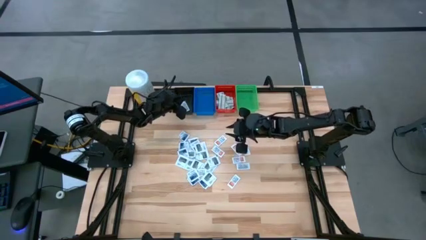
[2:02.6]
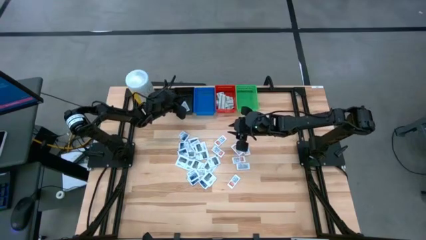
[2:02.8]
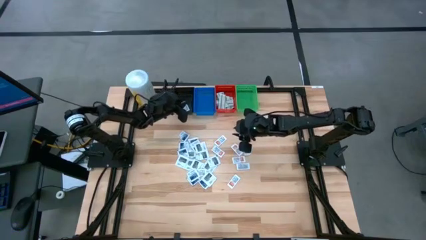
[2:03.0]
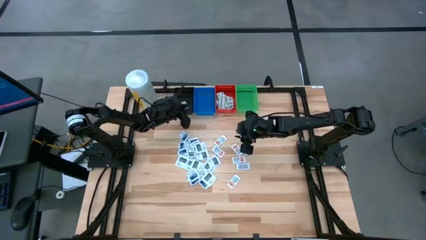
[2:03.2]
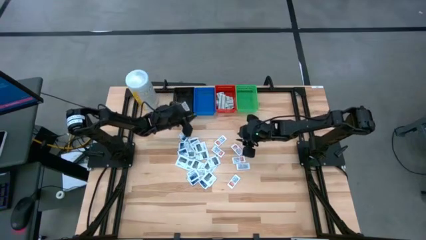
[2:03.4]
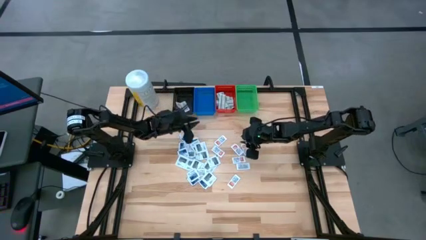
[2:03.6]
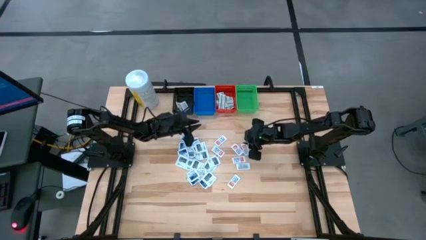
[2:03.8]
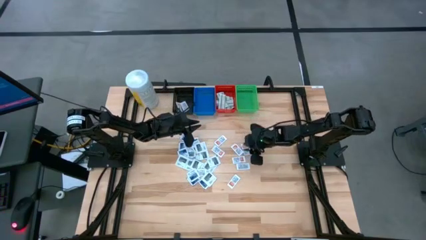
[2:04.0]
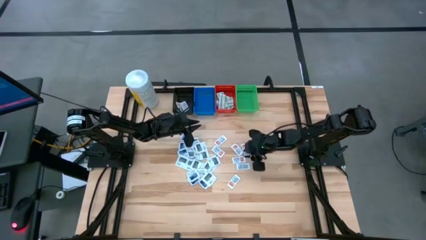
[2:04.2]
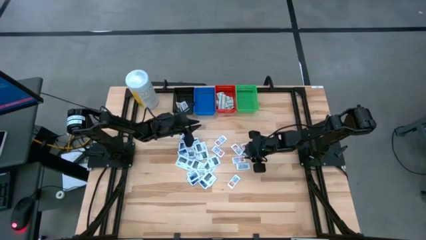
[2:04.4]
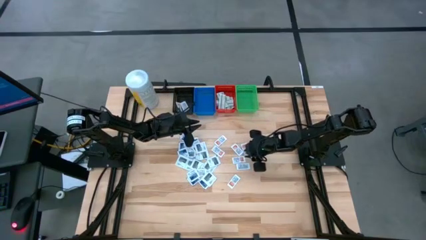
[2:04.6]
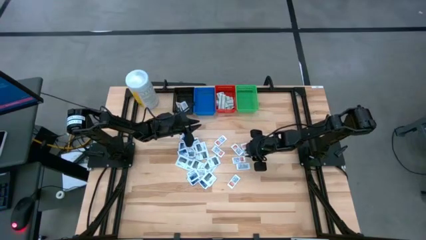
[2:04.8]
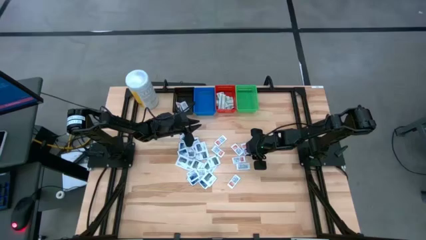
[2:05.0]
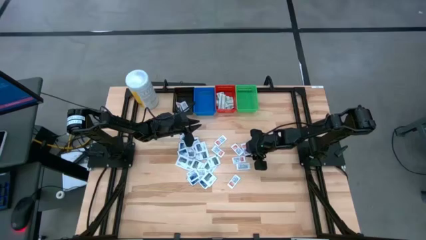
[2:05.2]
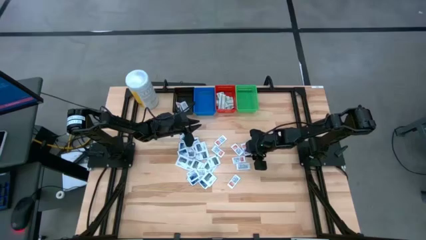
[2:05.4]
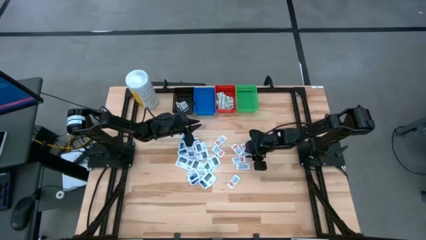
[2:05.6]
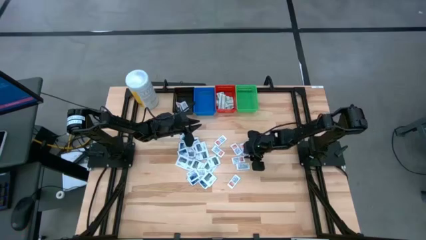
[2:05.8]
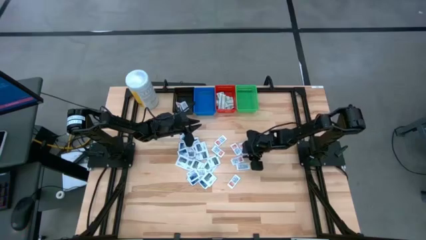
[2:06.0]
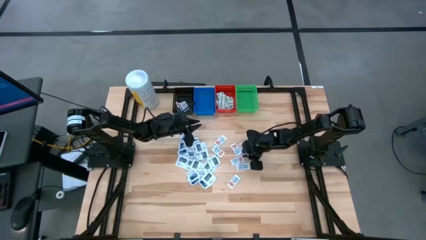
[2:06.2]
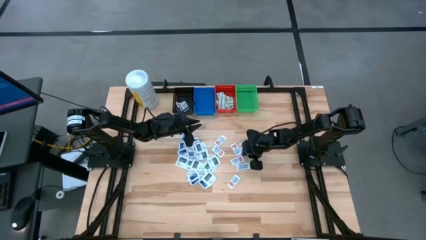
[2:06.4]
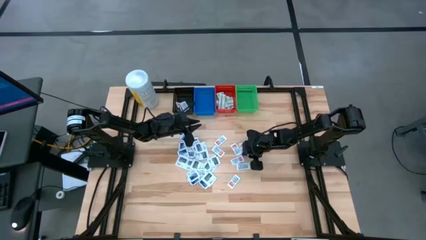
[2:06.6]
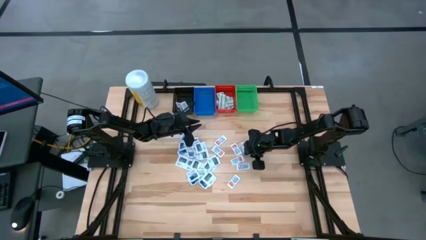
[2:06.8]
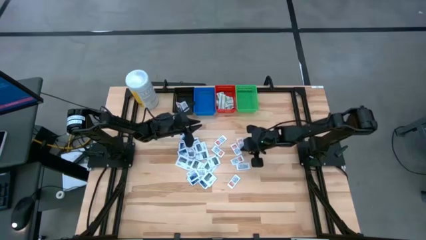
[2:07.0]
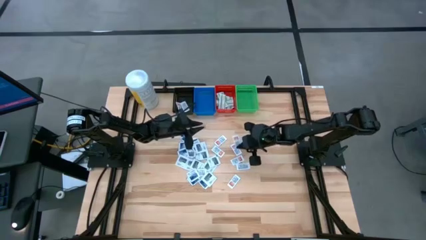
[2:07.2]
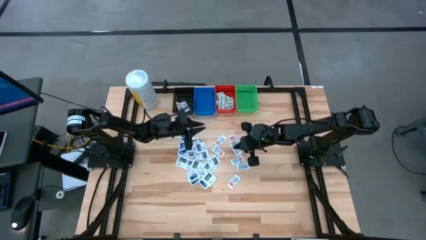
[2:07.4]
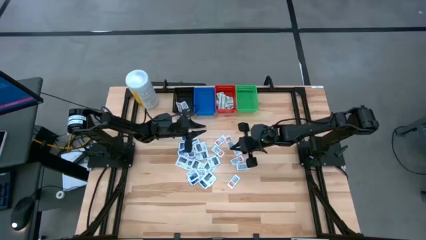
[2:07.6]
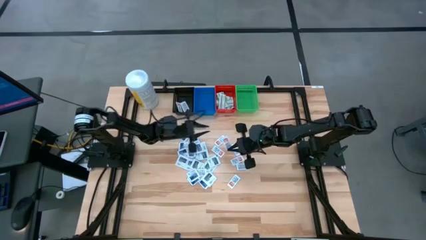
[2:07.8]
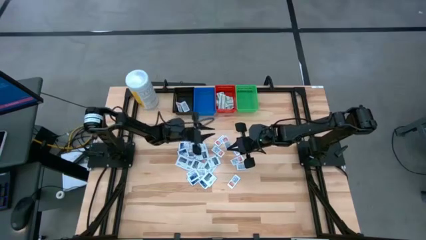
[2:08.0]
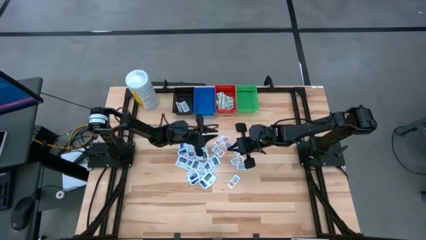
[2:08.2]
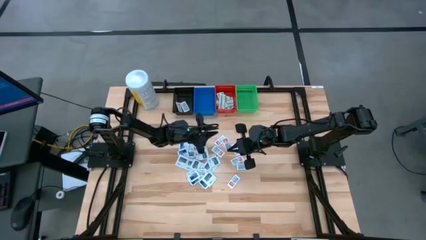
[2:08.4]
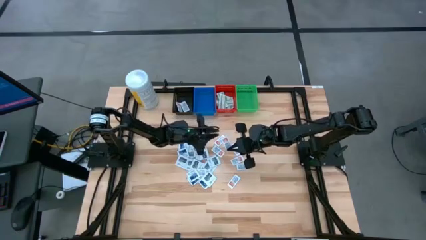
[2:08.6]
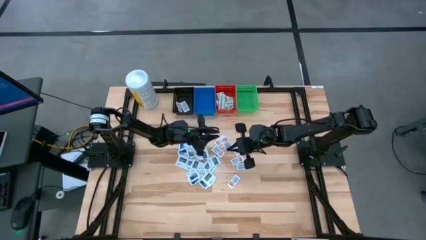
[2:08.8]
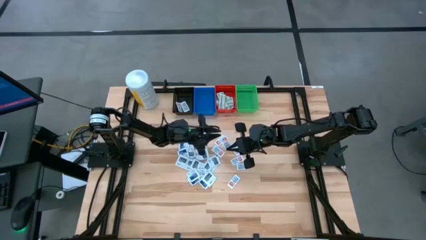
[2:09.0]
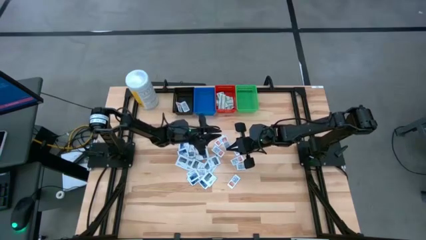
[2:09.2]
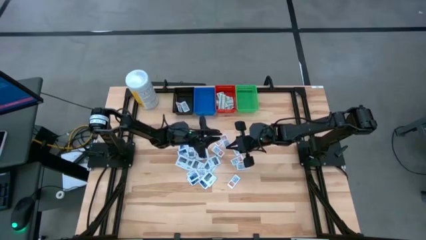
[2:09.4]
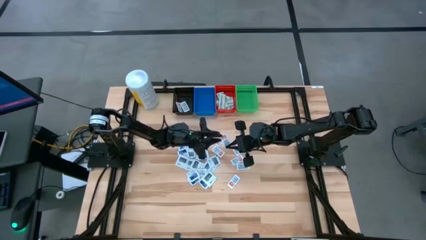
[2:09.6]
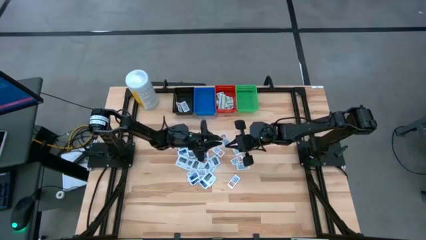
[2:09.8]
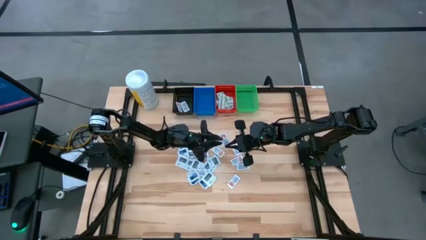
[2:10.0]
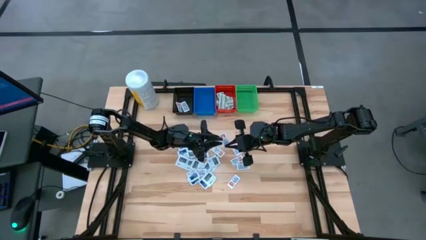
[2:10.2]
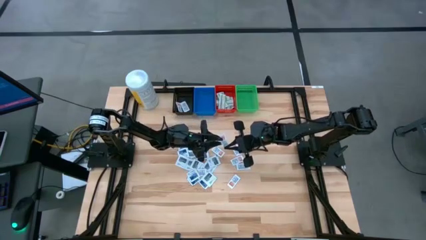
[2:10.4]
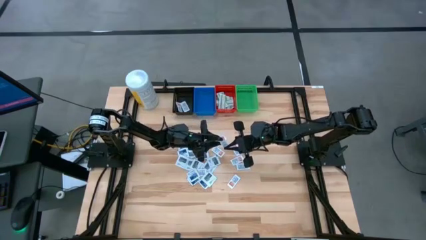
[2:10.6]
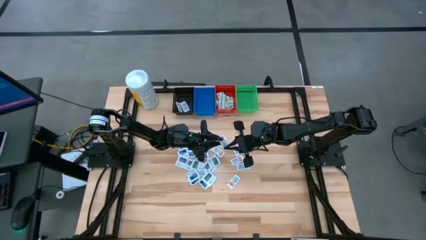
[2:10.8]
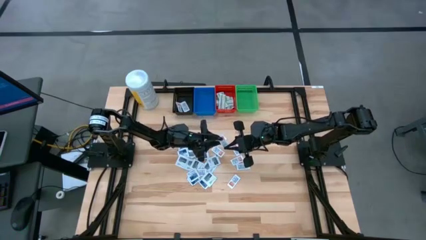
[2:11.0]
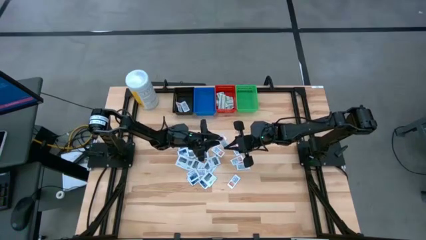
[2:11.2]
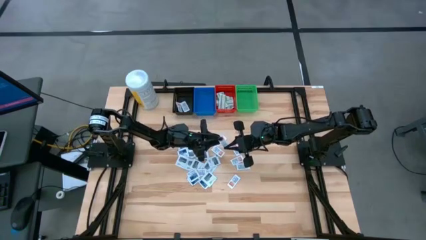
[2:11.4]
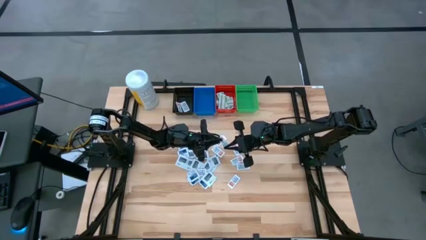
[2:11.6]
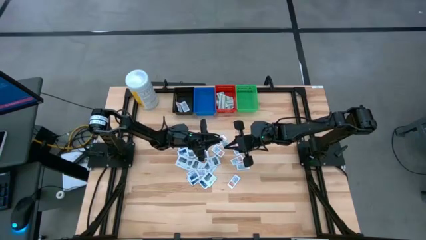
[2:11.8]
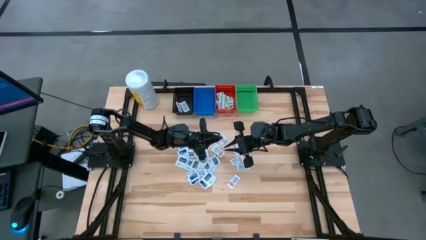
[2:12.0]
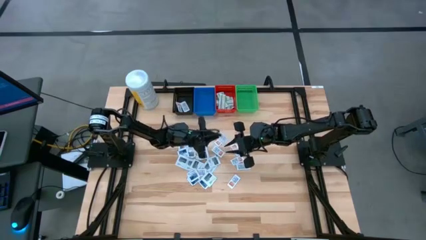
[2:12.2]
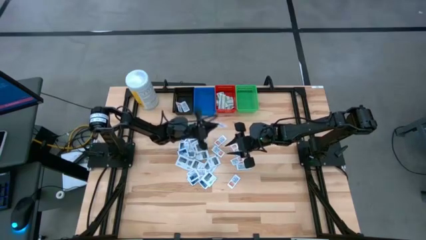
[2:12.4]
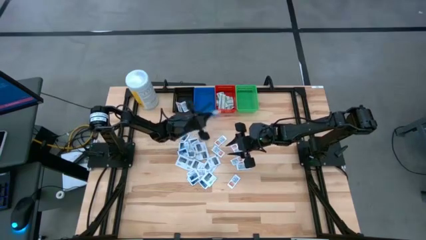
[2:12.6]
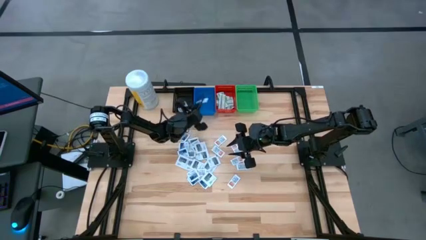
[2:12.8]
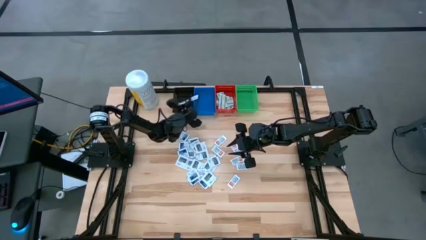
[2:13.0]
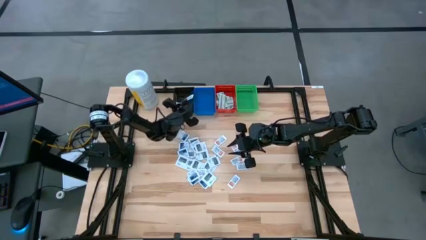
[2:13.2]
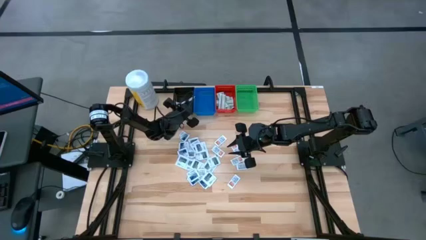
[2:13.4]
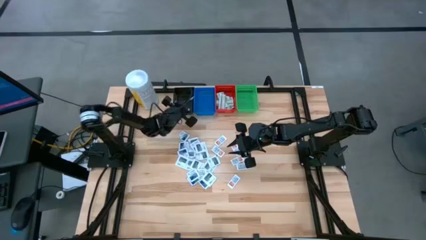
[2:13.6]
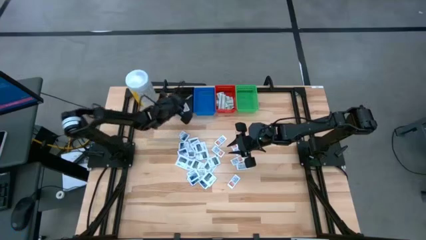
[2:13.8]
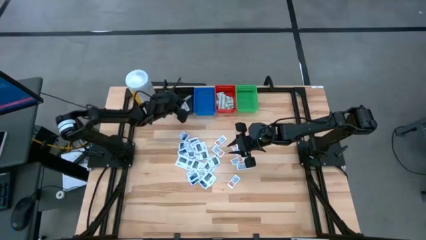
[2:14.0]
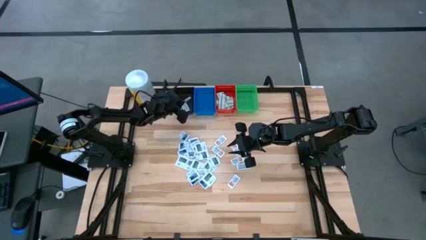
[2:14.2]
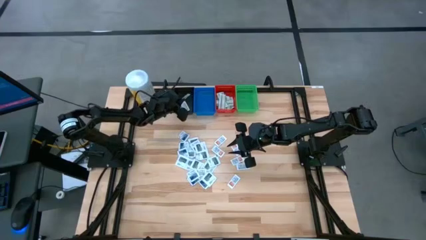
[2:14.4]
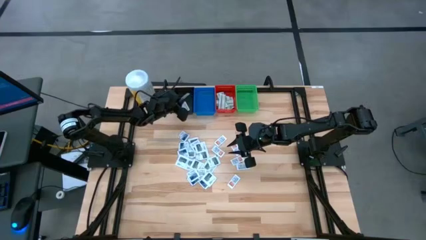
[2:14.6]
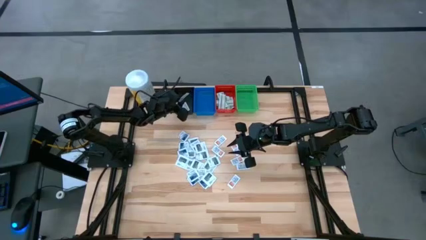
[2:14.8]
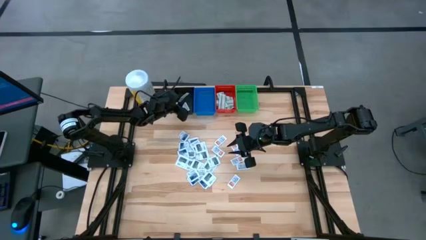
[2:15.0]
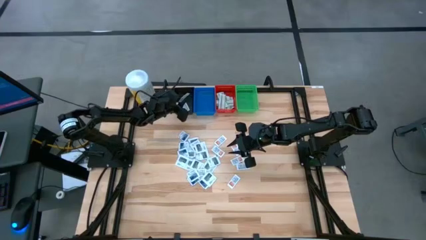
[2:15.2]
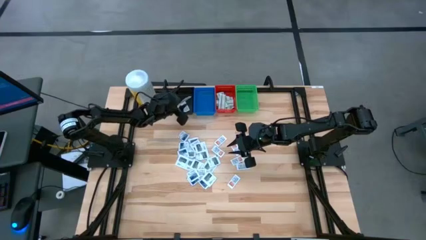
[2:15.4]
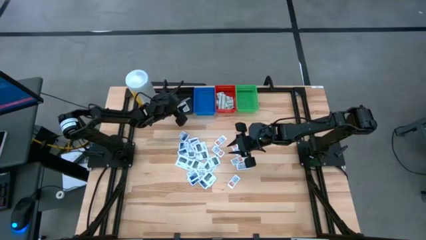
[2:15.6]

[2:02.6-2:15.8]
Task: Pick & Place First Aid Supplies
Put the orange ointment pack into the black bin
